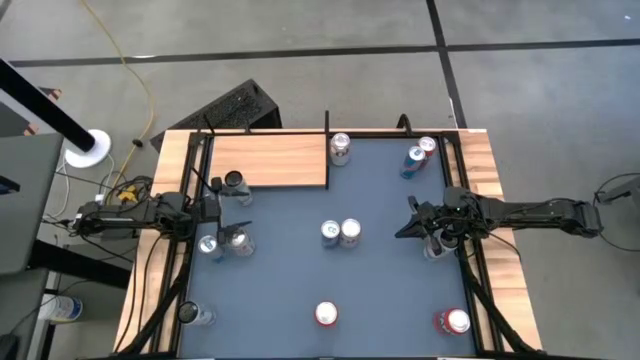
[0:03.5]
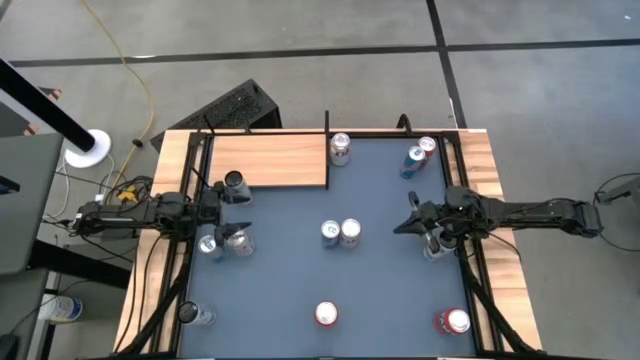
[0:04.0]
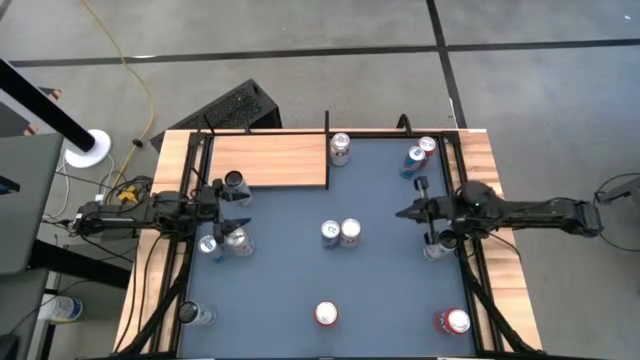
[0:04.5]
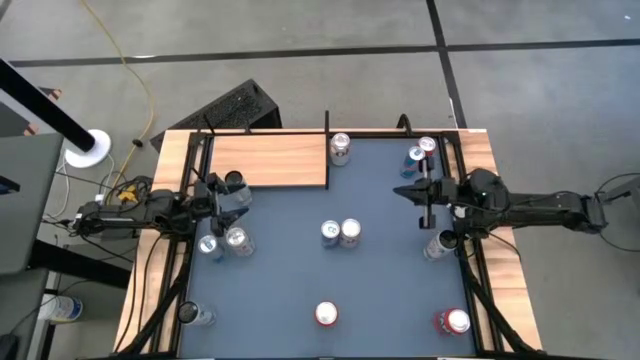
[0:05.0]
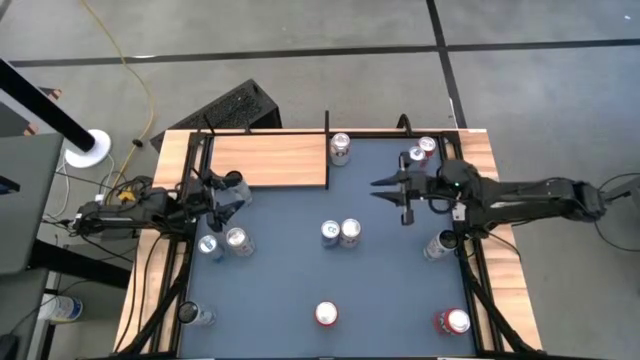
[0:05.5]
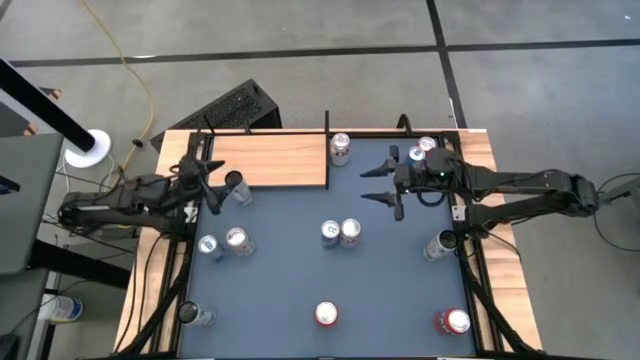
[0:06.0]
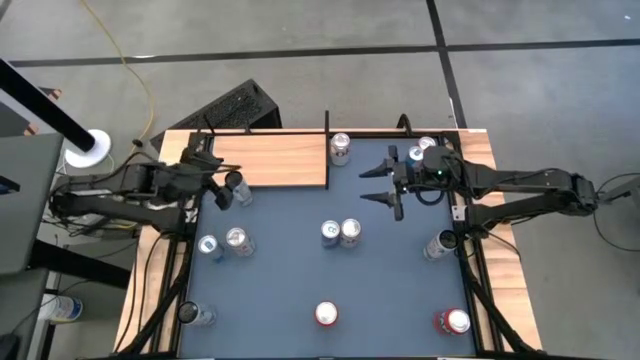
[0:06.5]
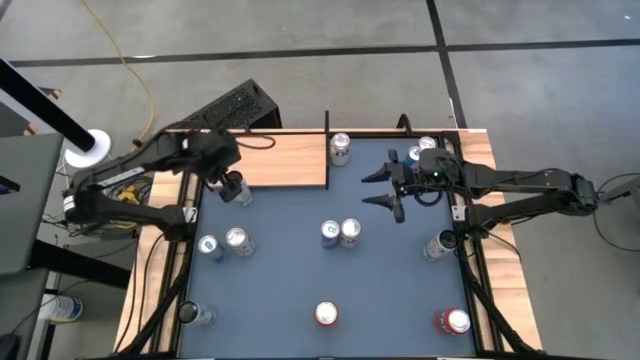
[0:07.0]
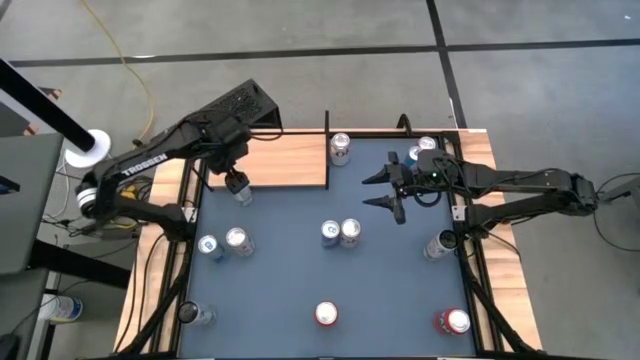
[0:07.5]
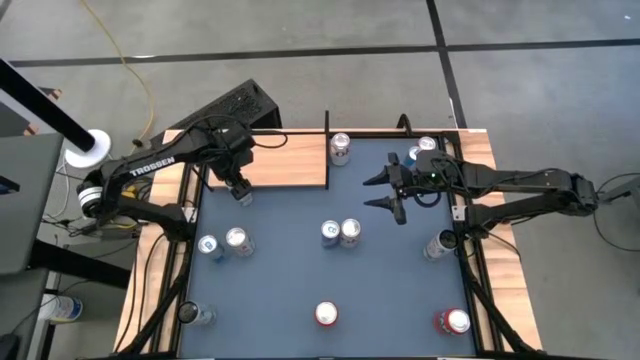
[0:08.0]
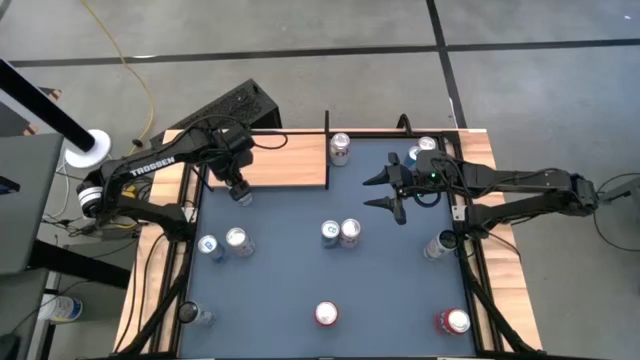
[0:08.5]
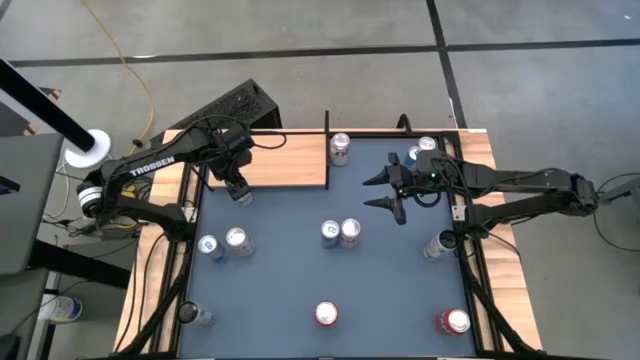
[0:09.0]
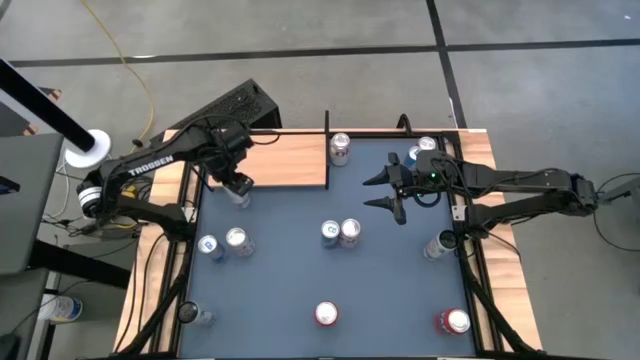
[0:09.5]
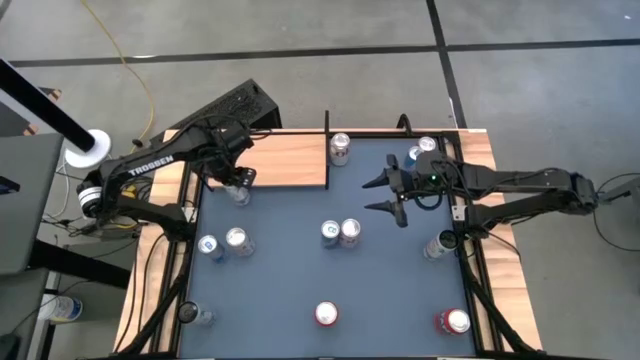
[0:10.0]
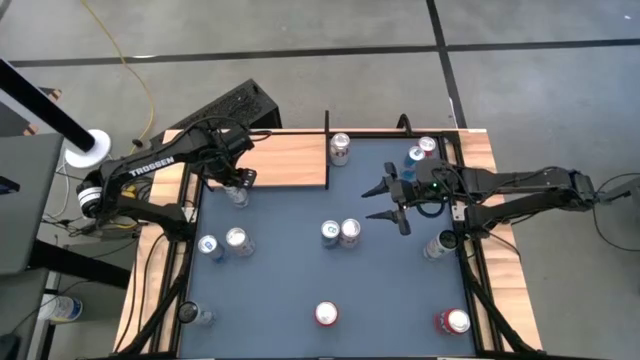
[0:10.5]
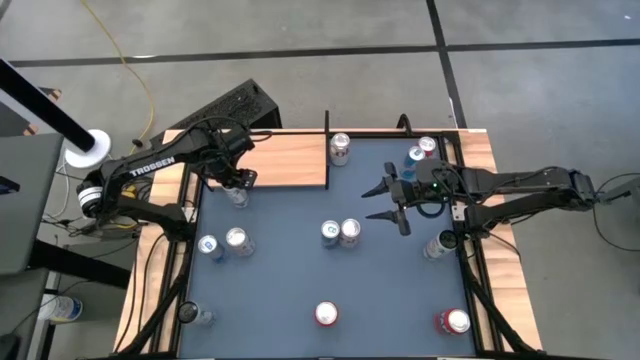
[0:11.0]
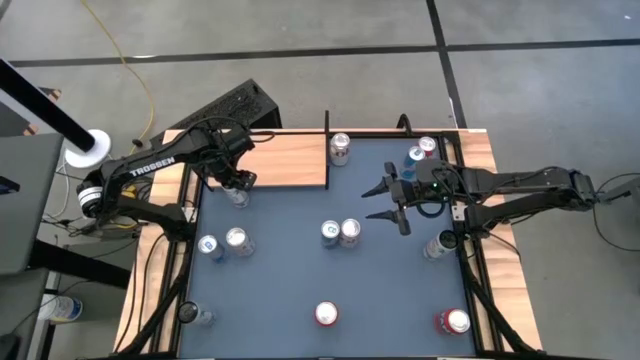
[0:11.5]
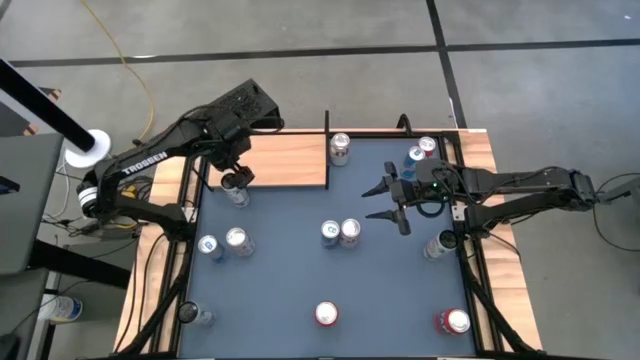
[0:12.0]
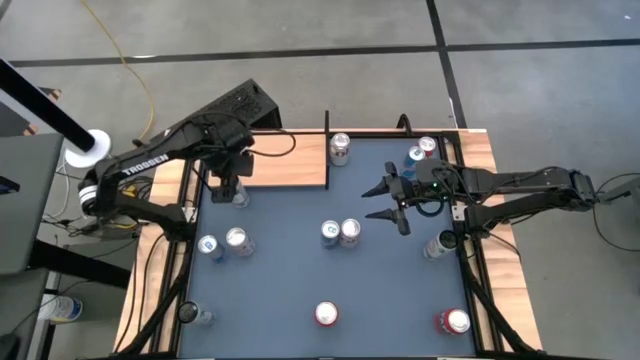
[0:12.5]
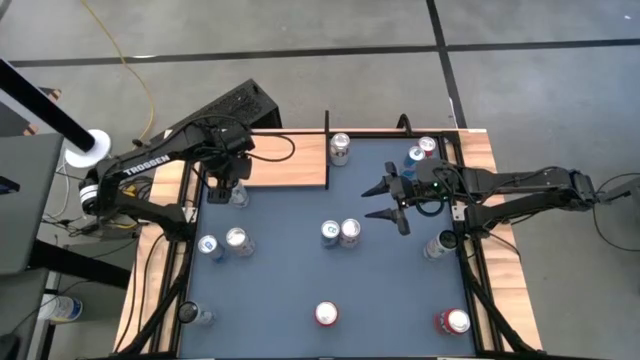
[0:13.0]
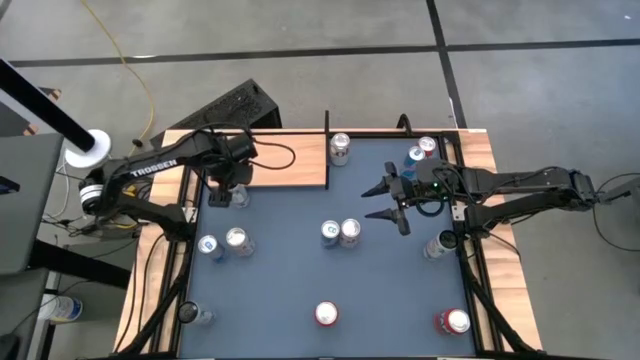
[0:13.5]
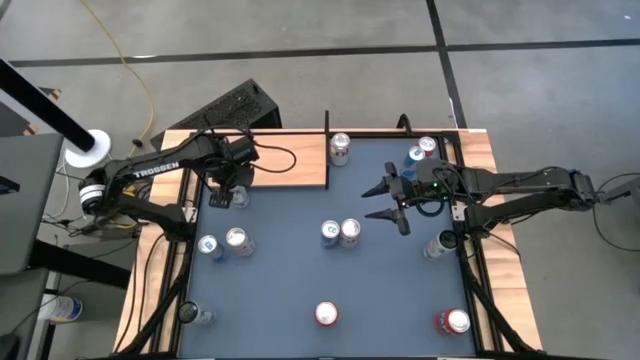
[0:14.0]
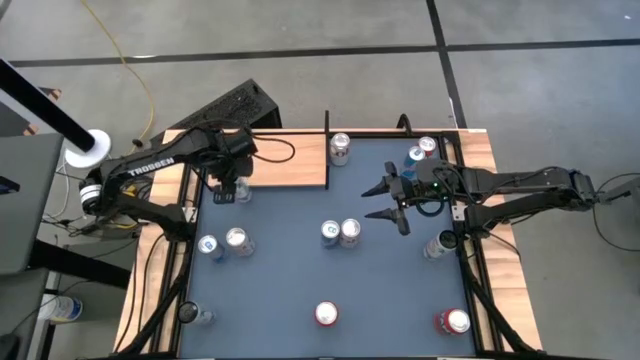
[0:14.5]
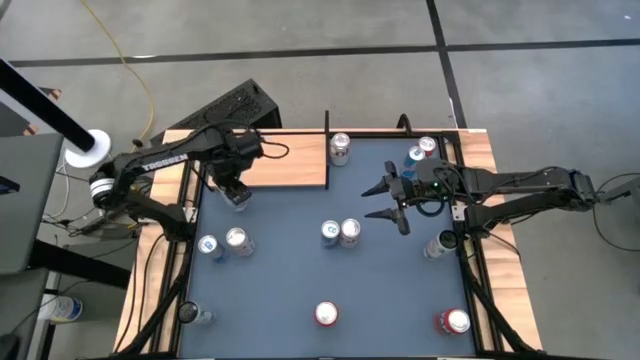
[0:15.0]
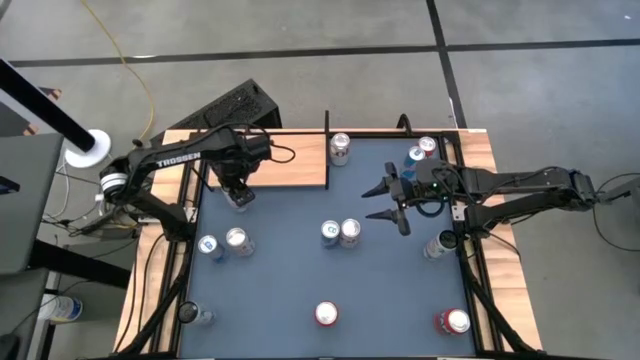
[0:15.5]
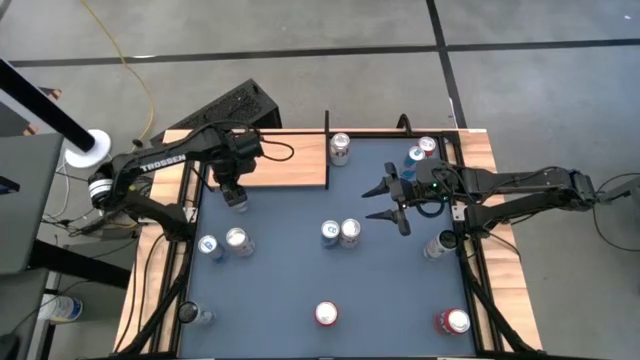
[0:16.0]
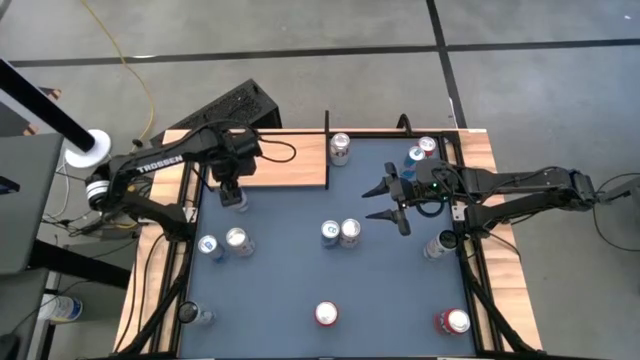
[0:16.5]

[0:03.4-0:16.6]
Task: Place canned beverage on shelf
Put the top left white pink soda can on the shelf

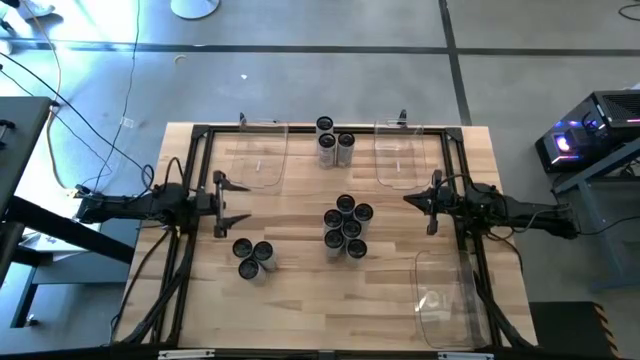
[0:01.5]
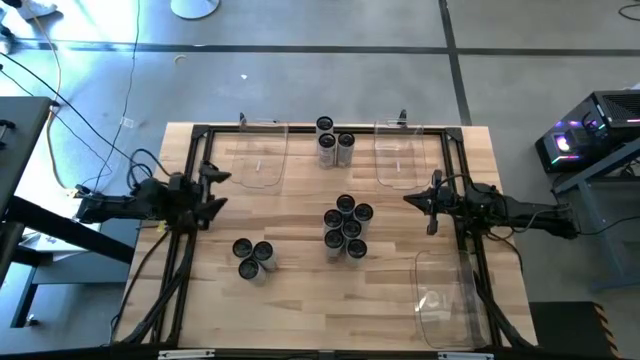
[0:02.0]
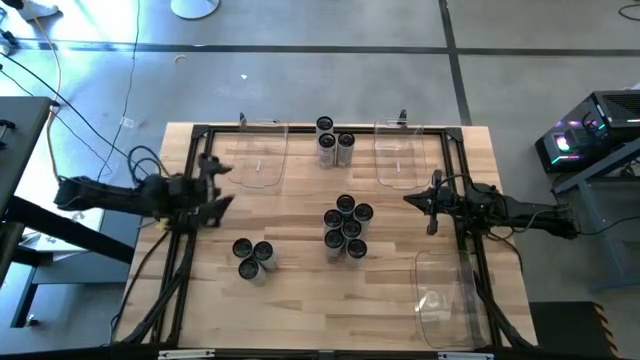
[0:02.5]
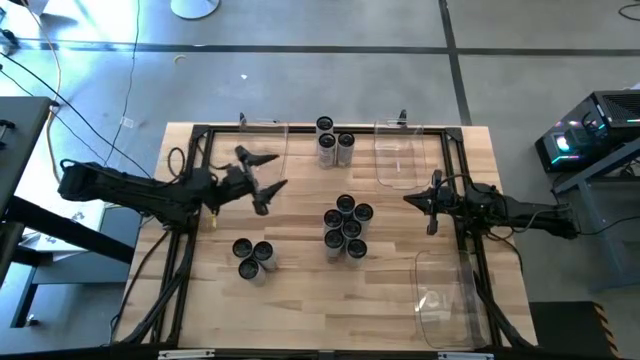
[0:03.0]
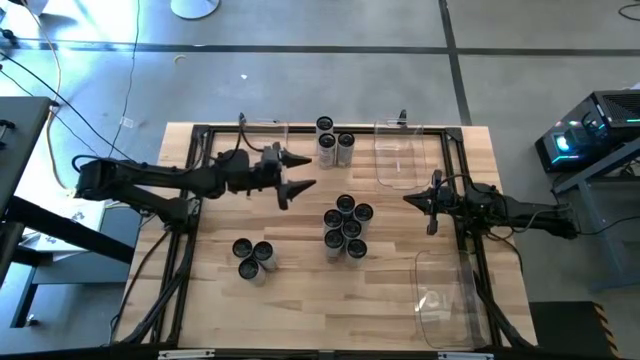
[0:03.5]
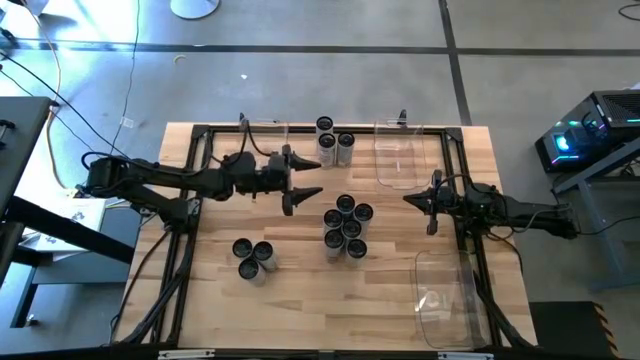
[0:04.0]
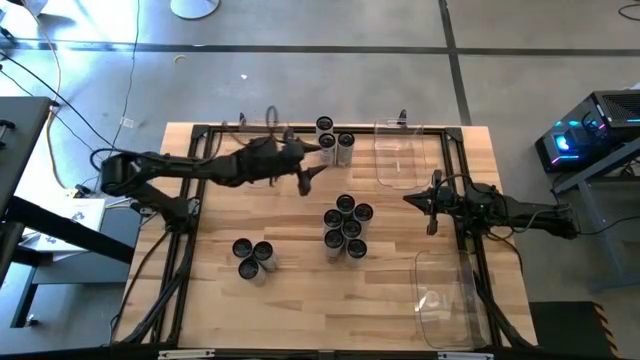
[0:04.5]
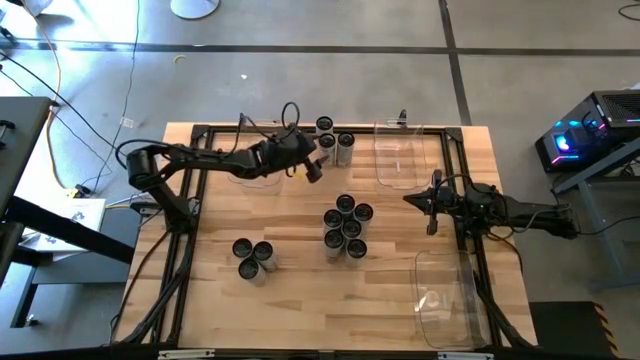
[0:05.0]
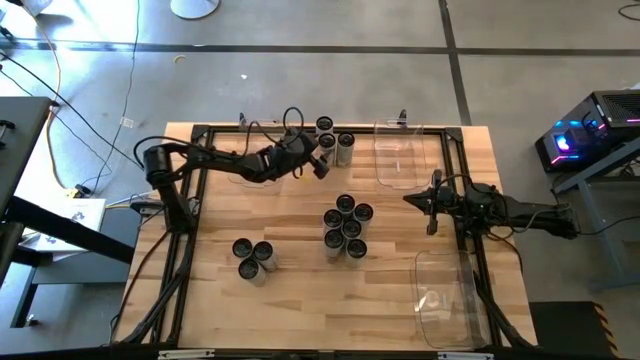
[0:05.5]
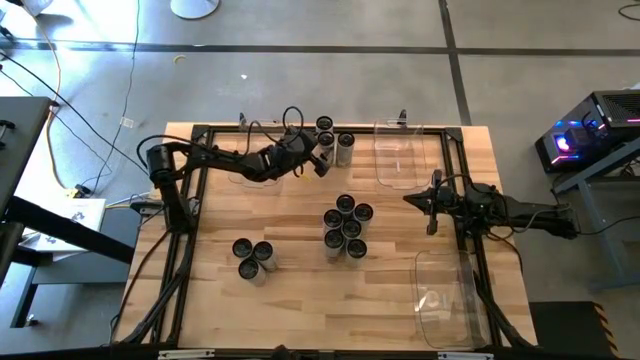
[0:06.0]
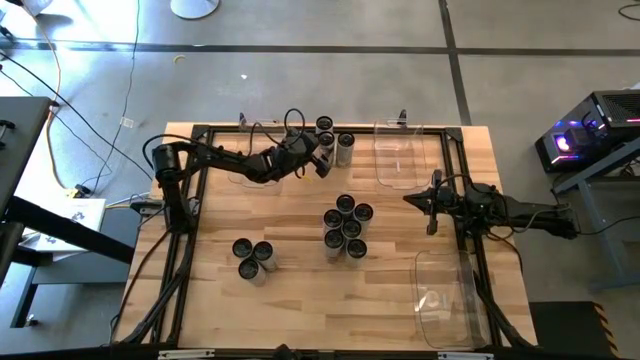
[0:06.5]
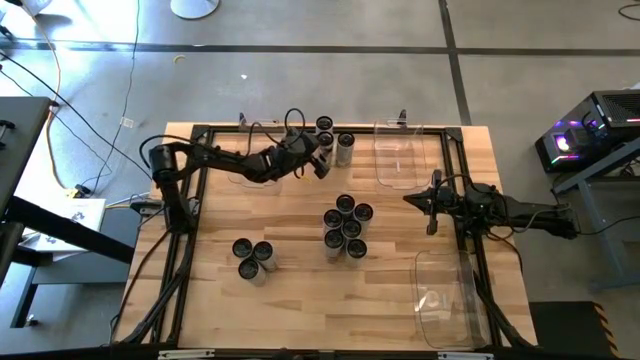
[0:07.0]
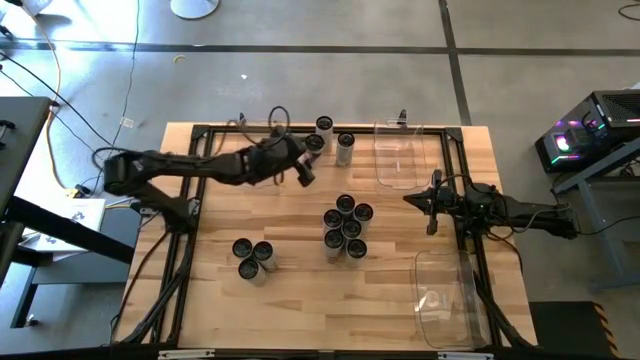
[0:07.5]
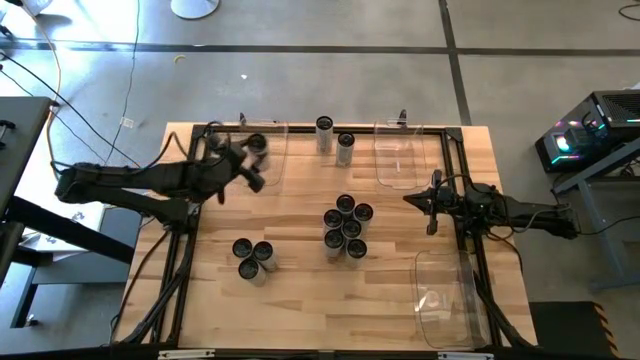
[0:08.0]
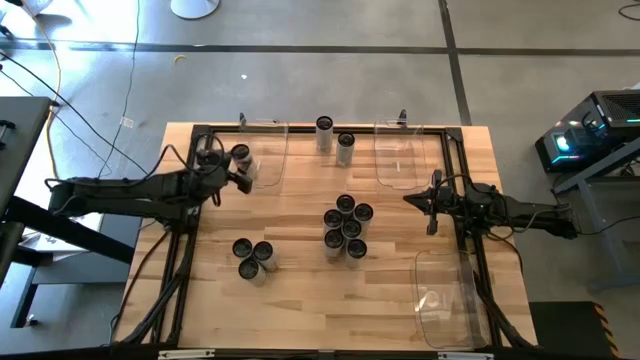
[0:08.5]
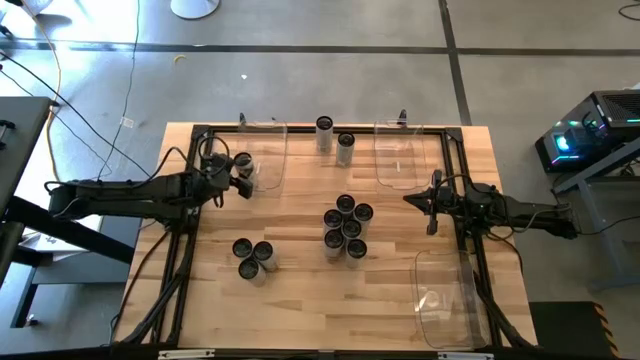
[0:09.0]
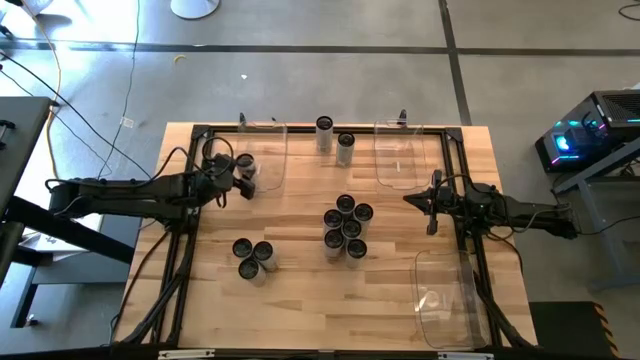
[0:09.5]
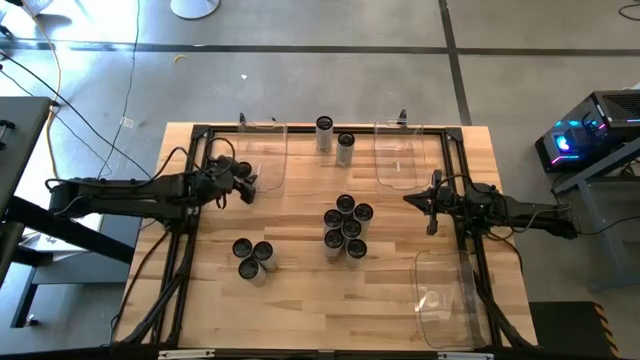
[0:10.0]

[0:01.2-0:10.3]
Task: Sort soda cans
Put the white-pink soda can into the top left transparent bin
